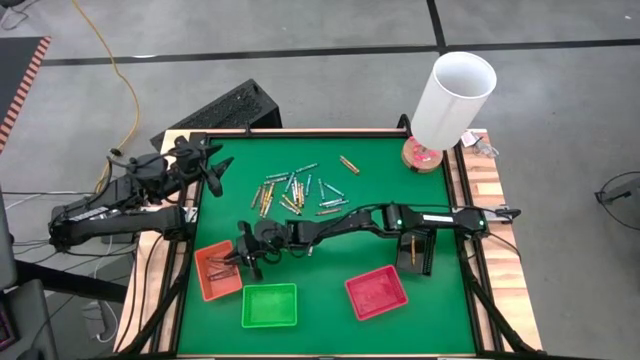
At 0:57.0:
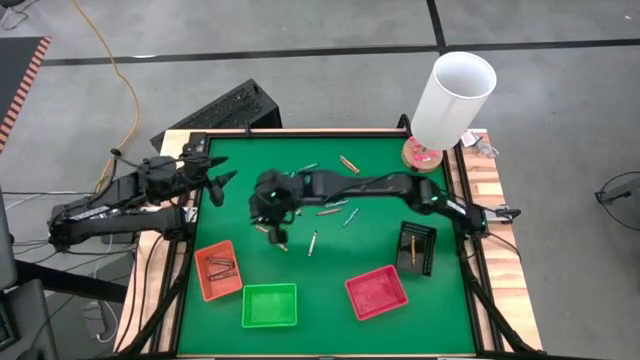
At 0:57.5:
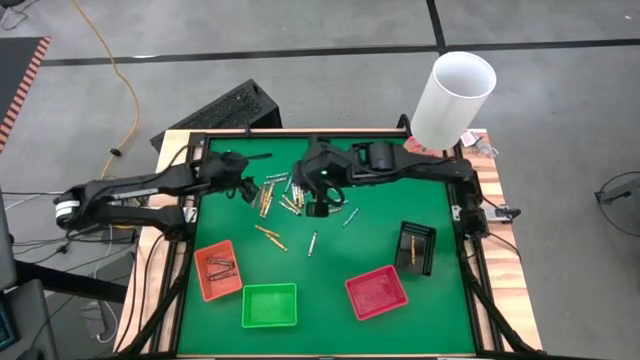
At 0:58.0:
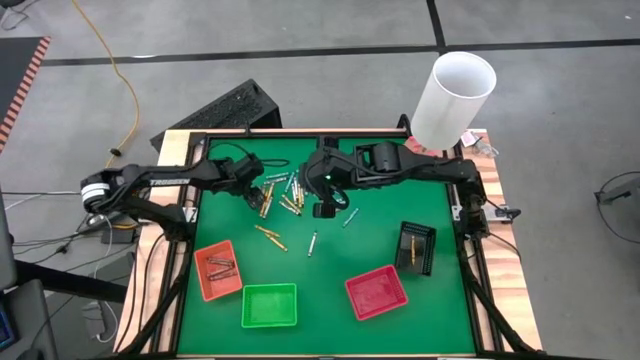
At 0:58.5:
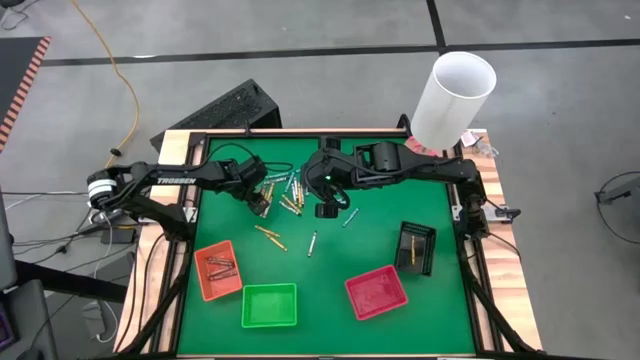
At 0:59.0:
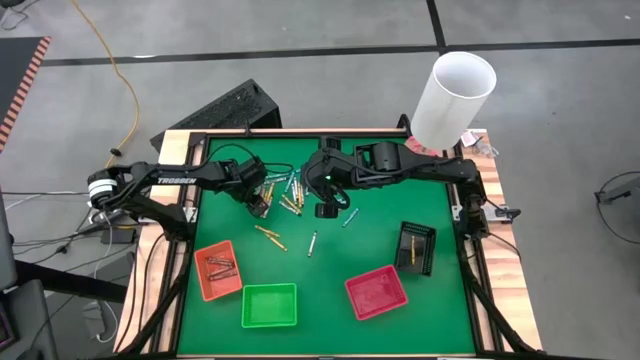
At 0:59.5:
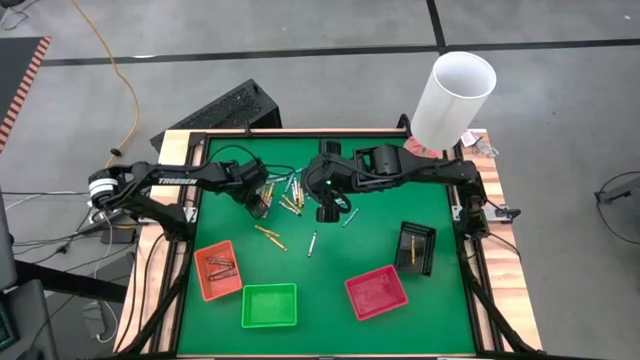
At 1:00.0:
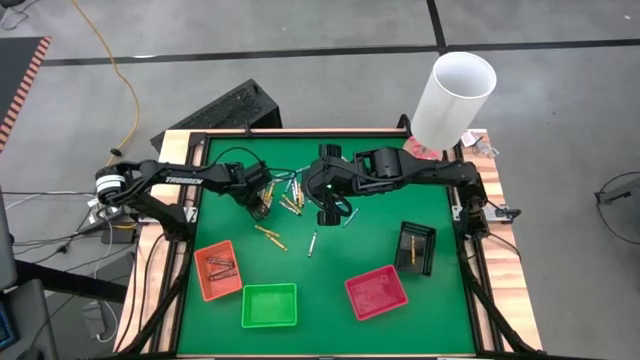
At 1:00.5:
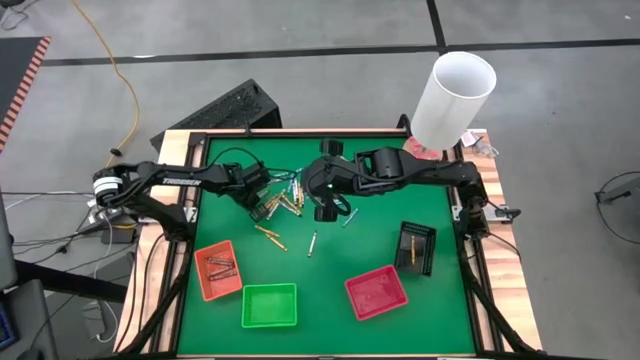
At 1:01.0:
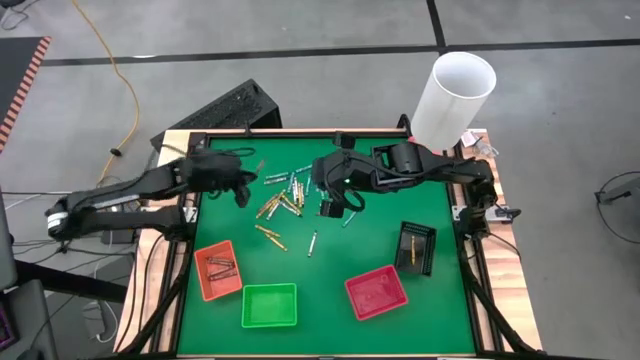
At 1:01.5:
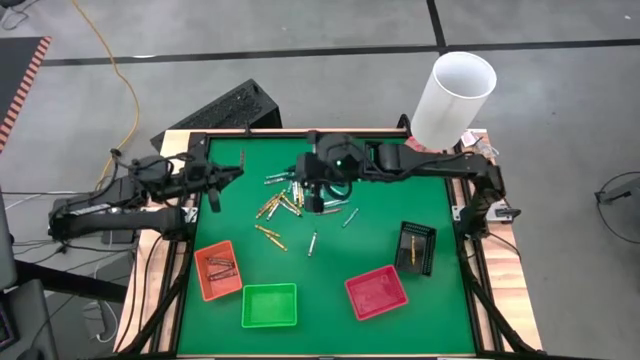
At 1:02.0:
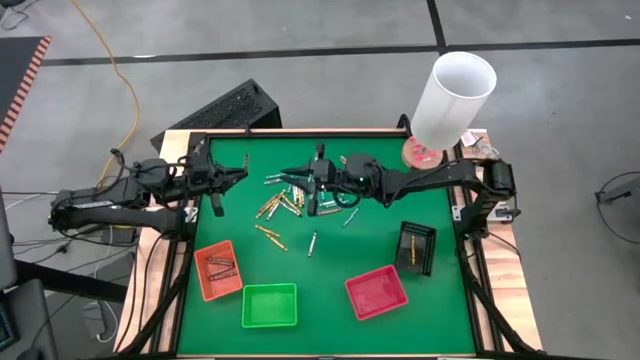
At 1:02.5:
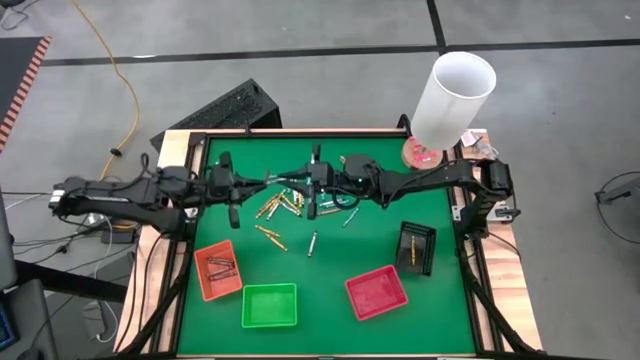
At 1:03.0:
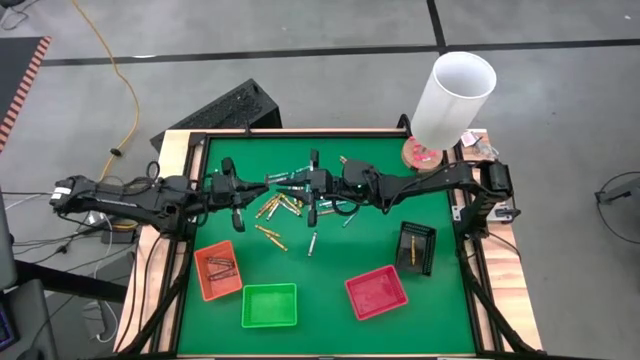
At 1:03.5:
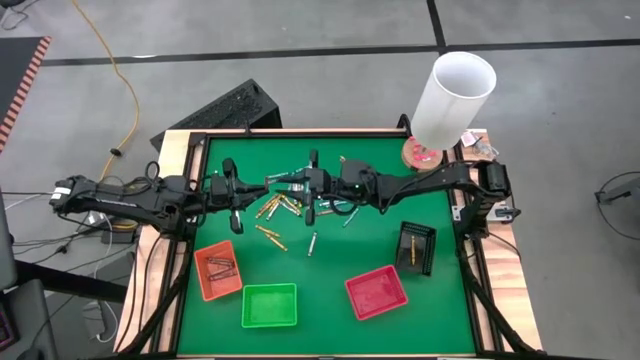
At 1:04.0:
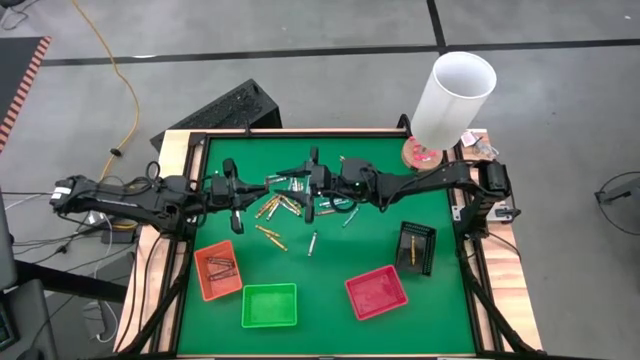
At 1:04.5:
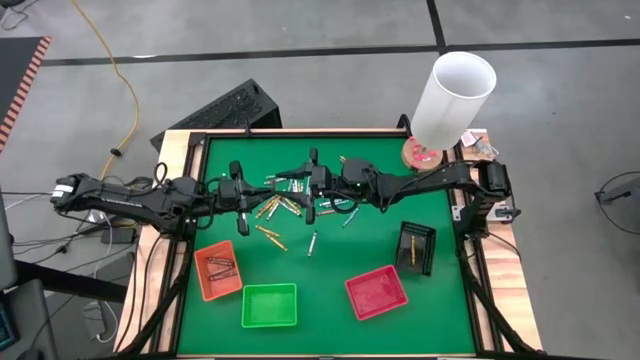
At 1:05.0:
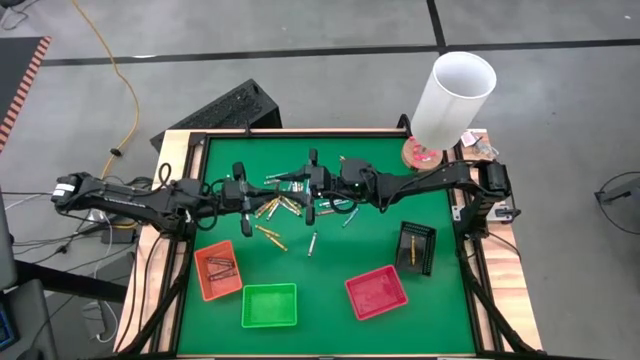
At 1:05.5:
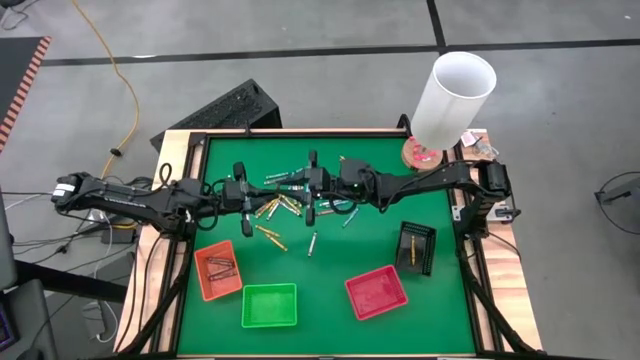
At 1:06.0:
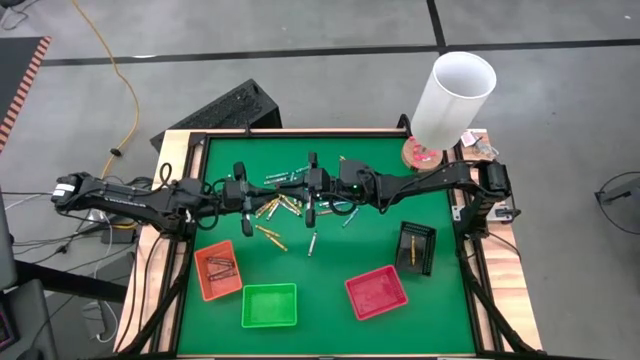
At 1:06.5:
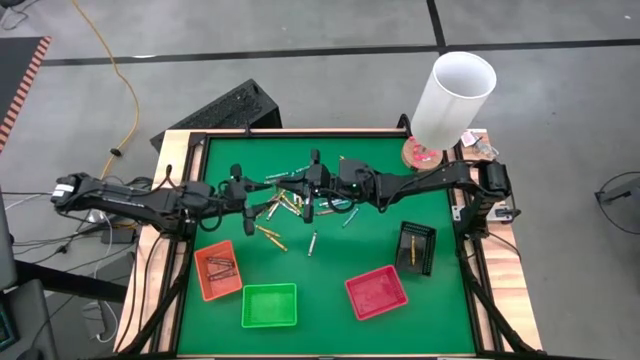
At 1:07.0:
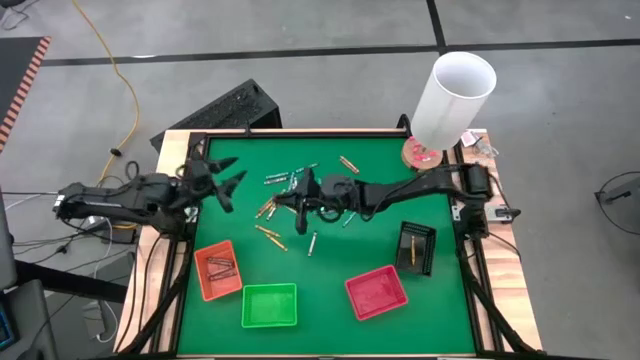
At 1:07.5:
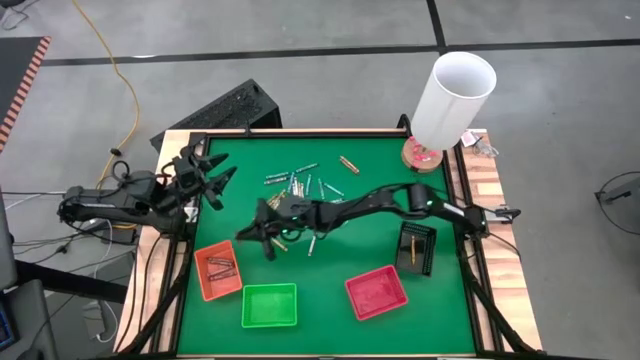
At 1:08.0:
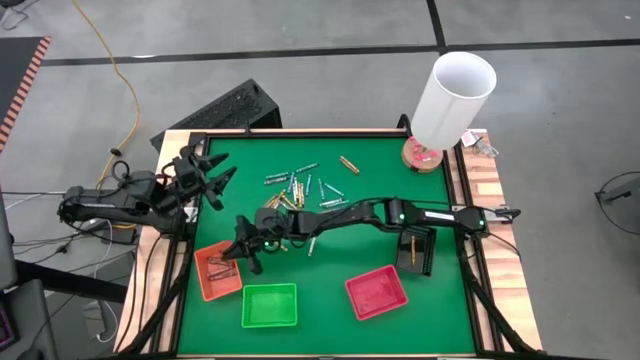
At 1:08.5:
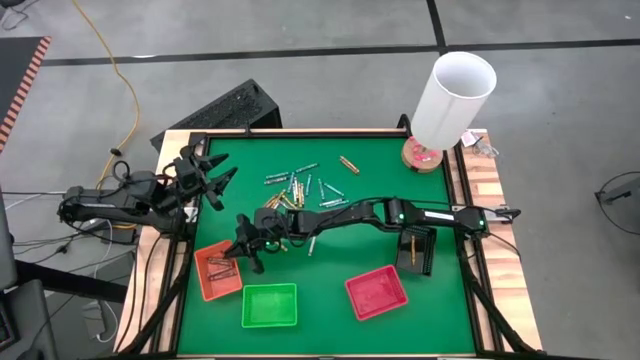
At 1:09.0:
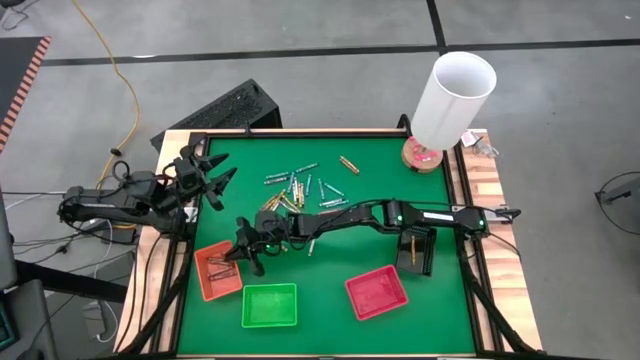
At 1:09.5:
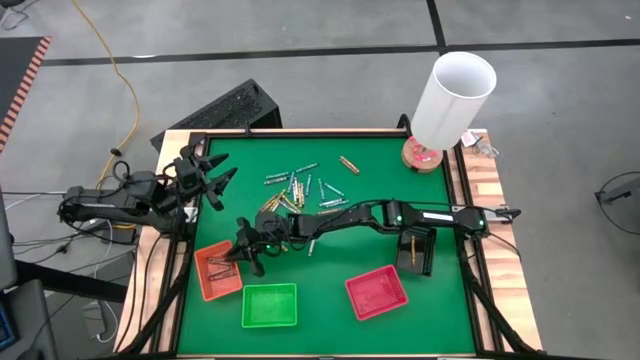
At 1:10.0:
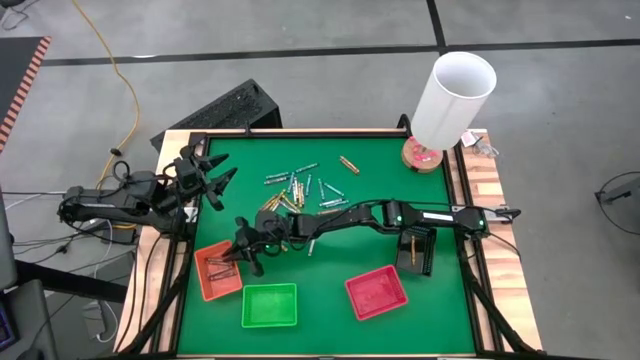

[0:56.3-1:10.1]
Task: Sort crayons
Put the brown crayon into the orange bin

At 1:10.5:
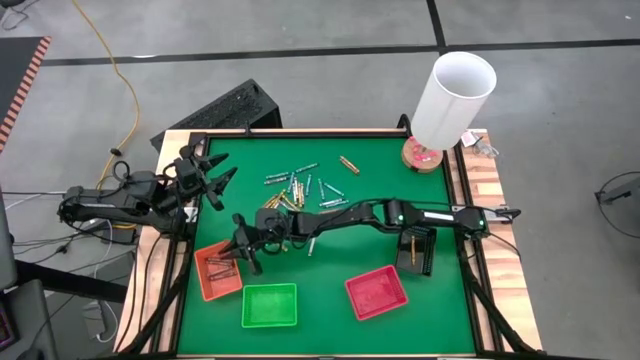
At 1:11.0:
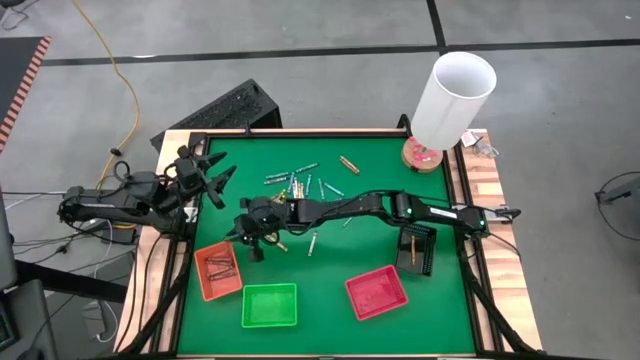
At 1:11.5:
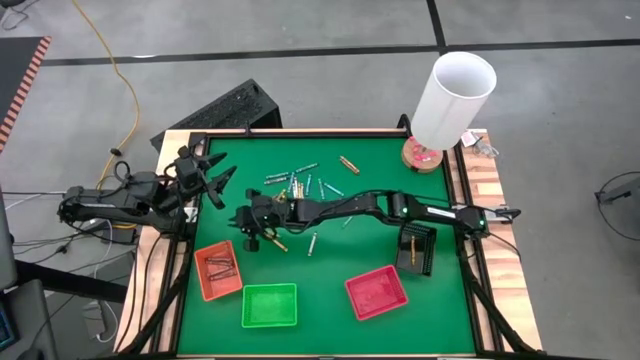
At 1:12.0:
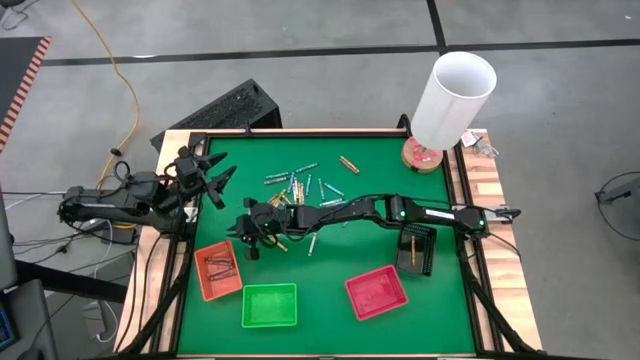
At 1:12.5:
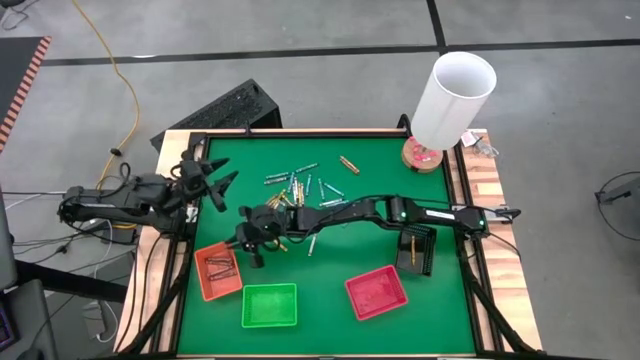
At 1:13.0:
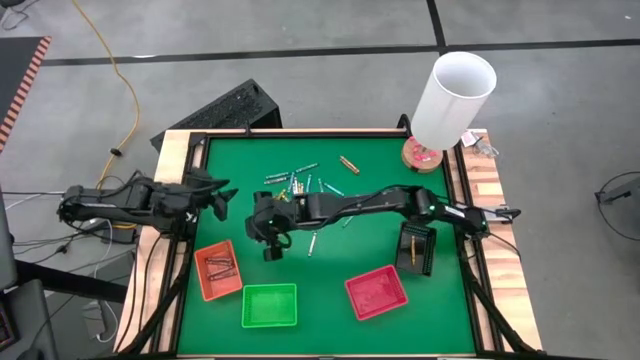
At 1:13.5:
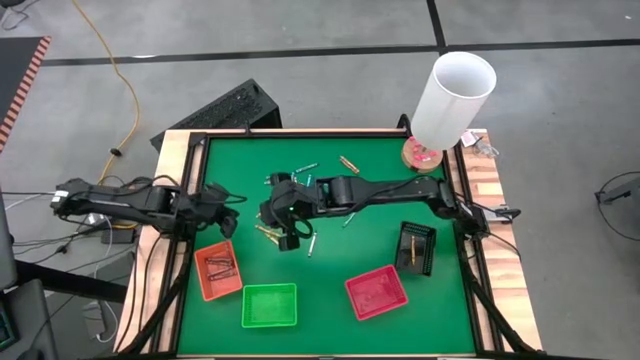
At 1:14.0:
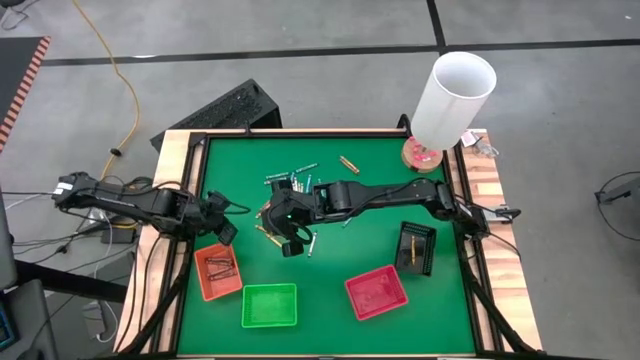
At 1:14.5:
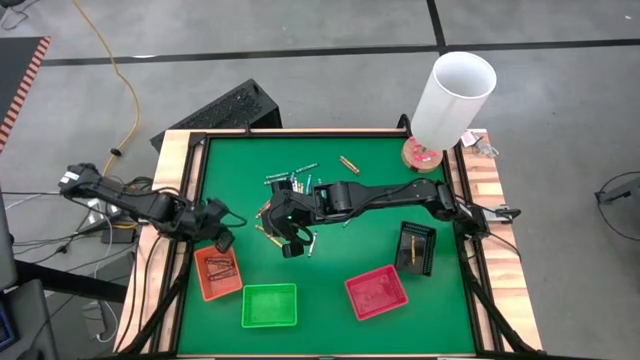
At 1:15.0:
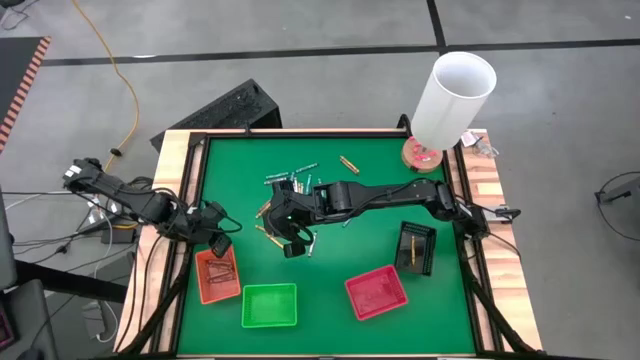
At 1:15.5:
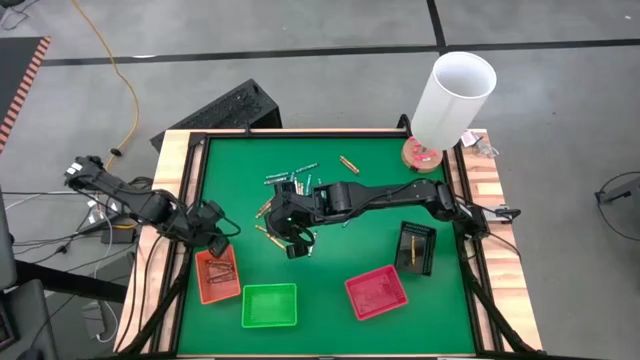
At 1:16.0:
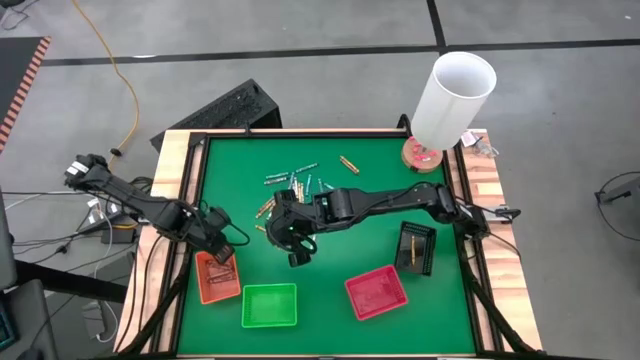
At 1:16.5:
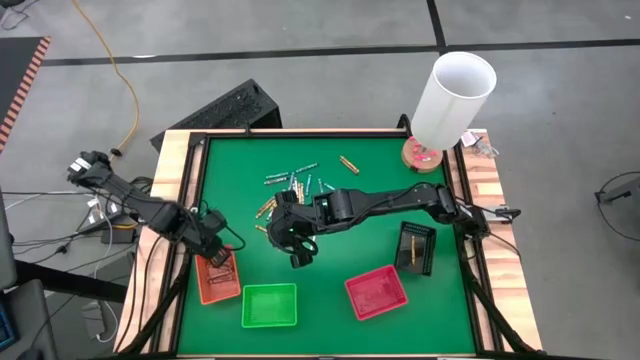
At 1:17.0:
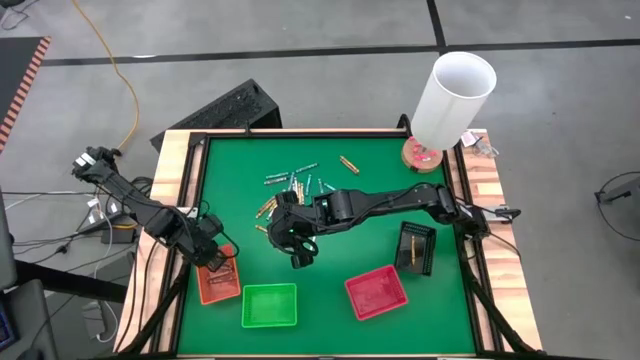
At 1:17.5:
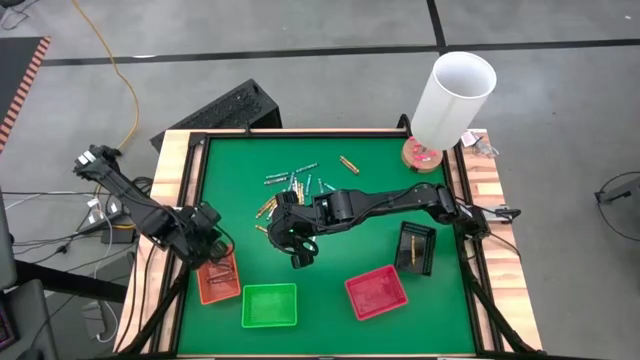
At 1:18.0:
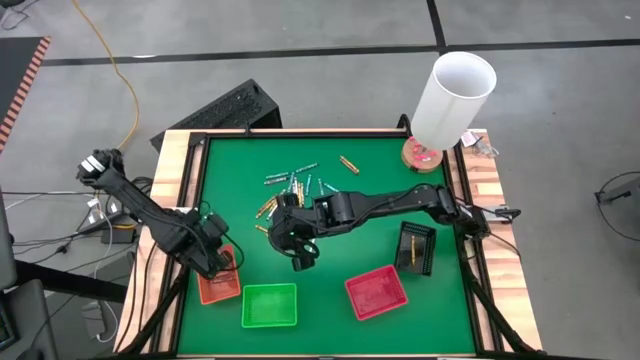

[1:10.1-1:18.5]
Adjust the orange bin on the table
